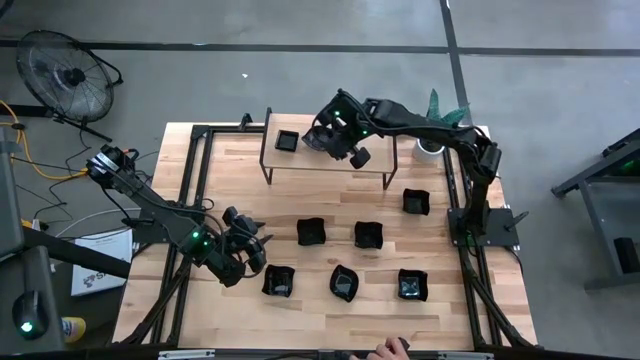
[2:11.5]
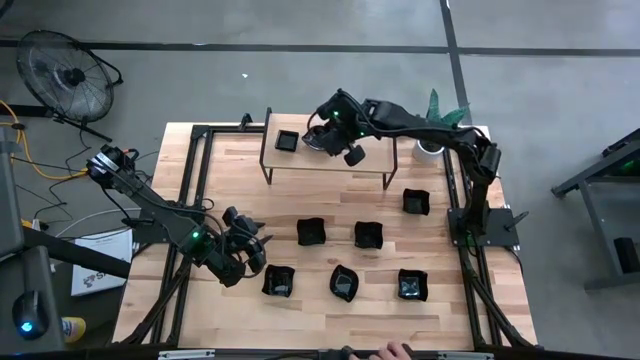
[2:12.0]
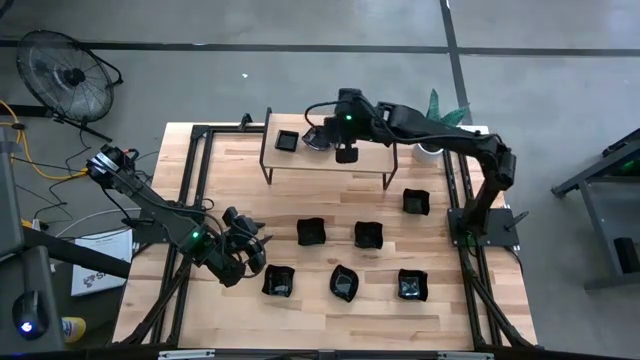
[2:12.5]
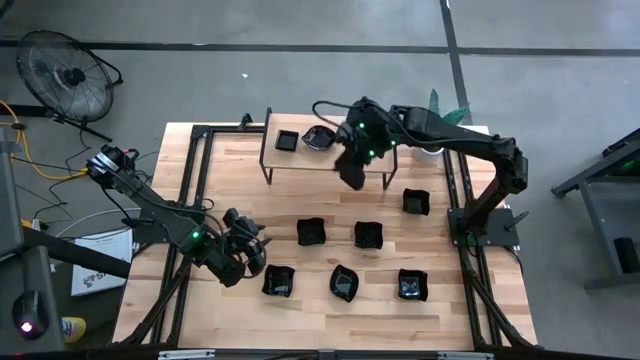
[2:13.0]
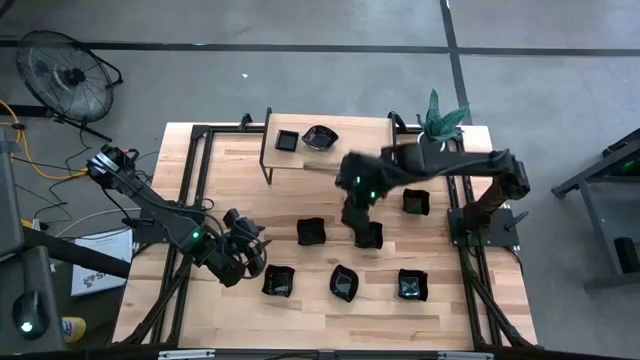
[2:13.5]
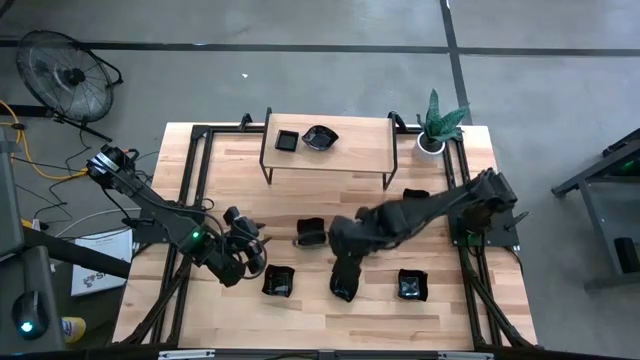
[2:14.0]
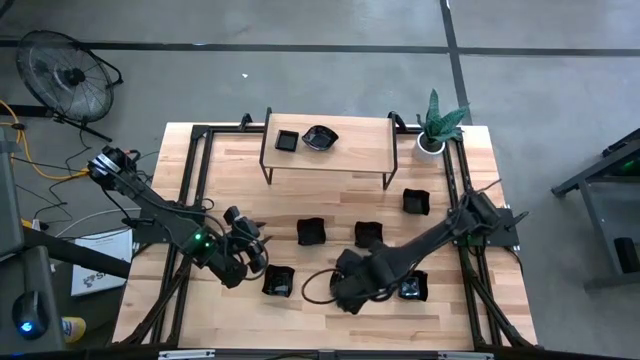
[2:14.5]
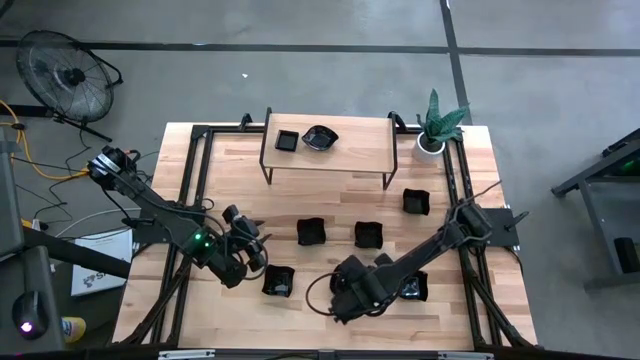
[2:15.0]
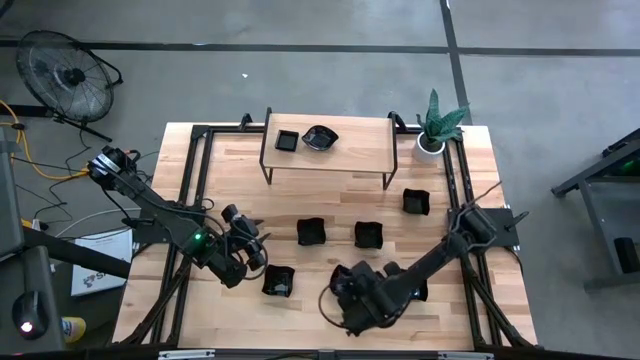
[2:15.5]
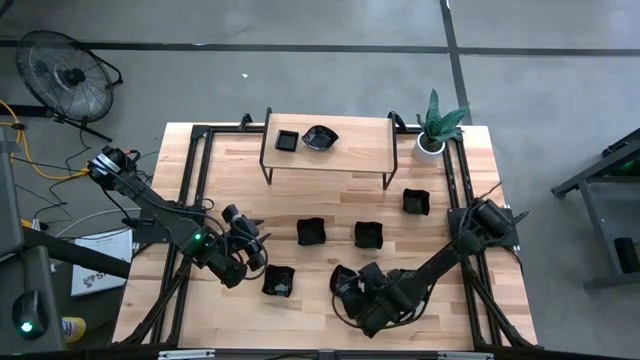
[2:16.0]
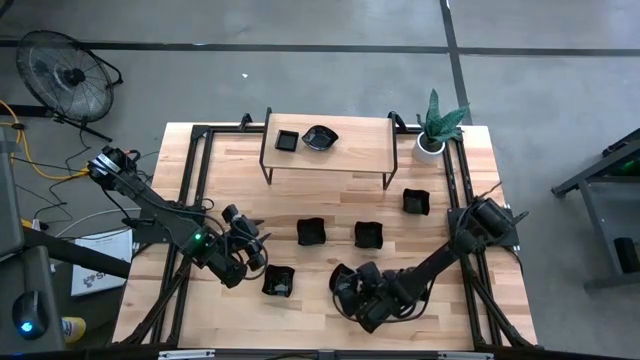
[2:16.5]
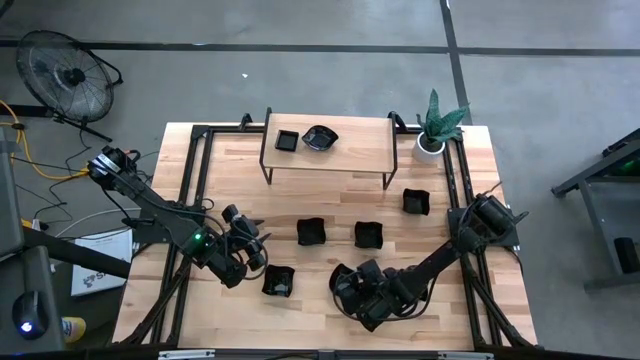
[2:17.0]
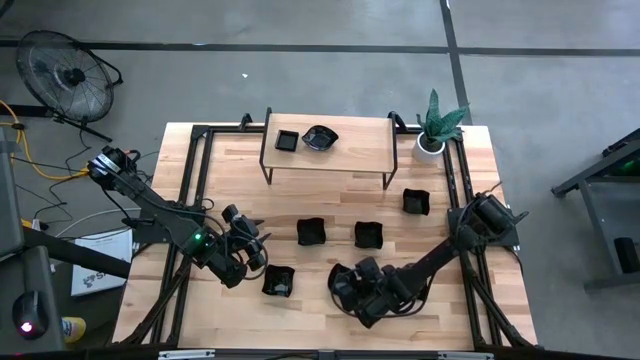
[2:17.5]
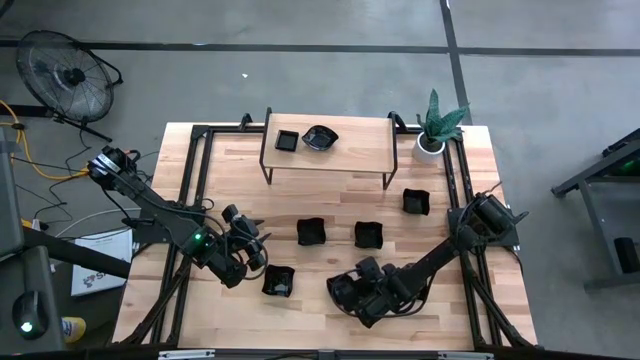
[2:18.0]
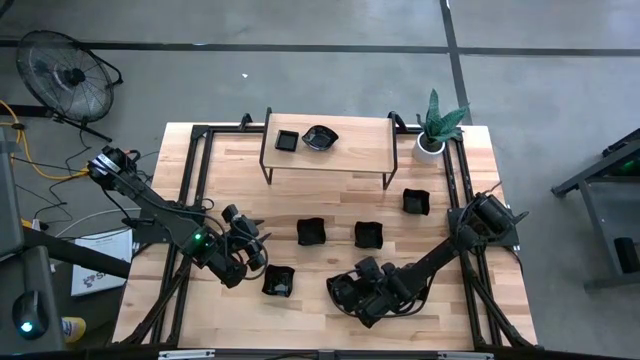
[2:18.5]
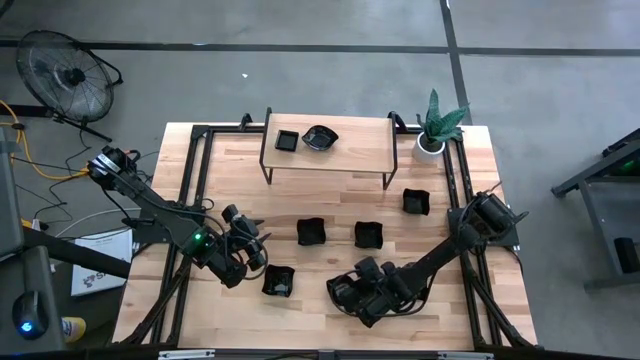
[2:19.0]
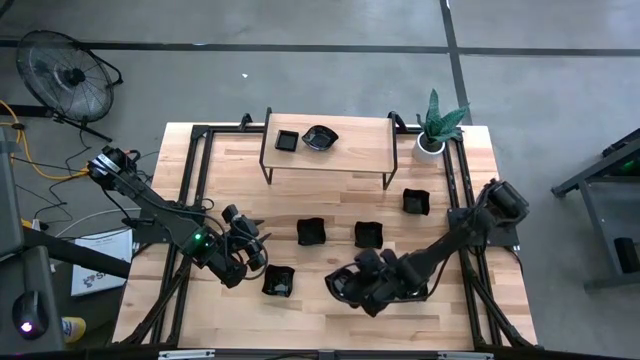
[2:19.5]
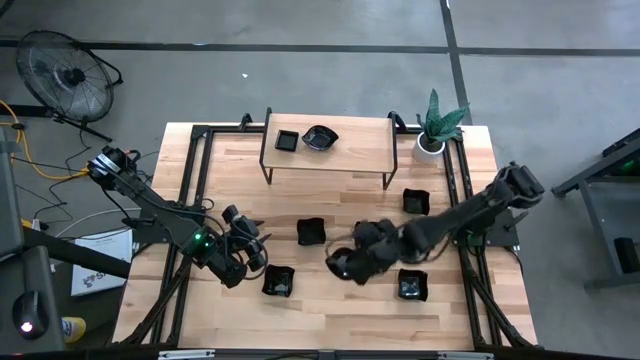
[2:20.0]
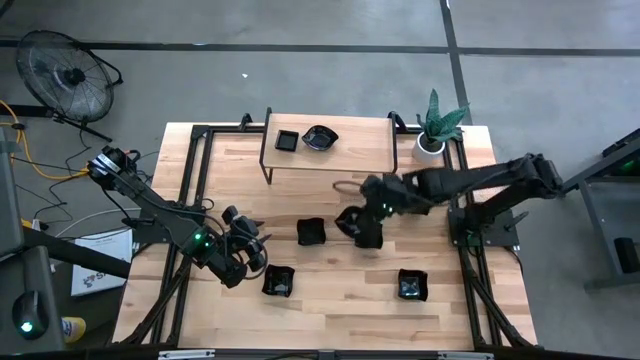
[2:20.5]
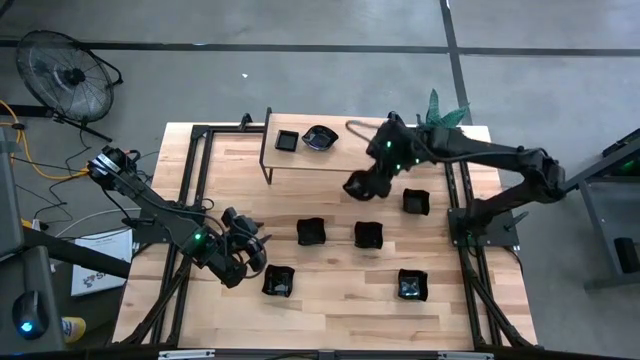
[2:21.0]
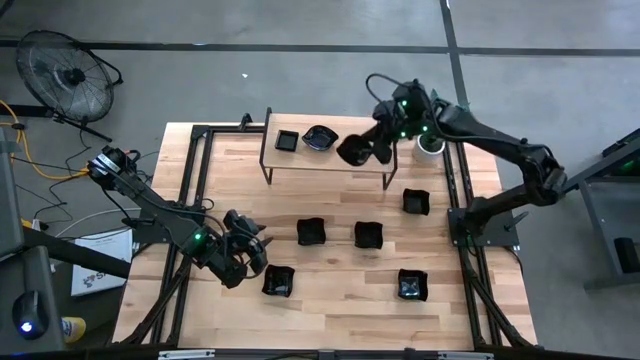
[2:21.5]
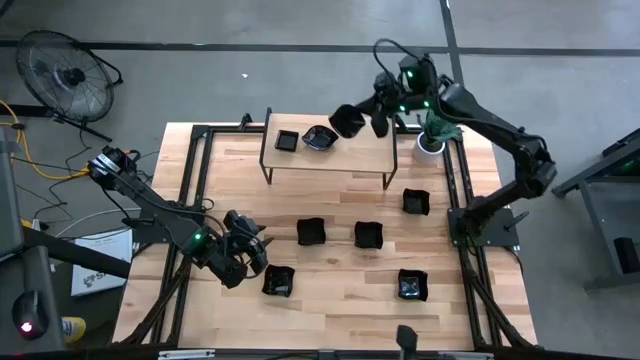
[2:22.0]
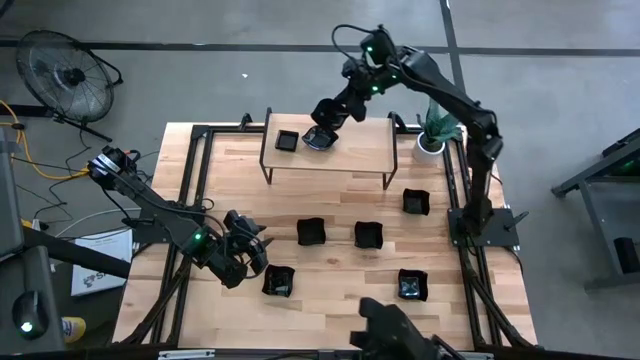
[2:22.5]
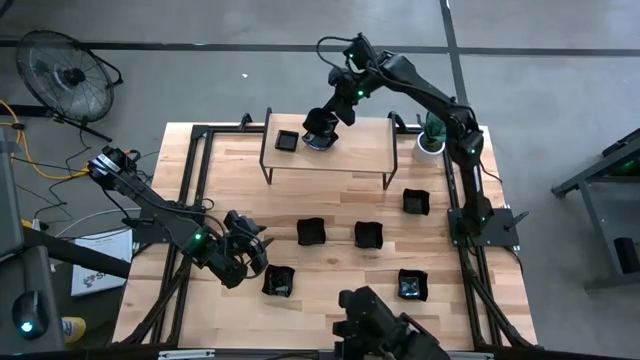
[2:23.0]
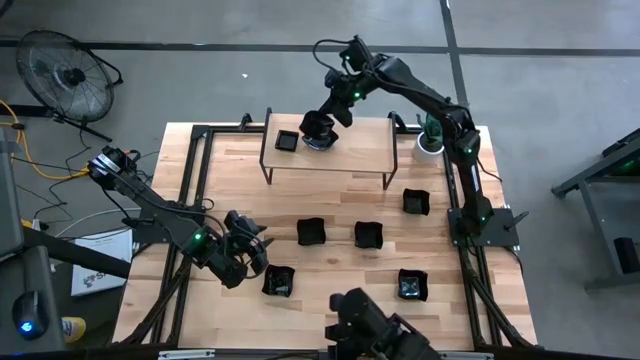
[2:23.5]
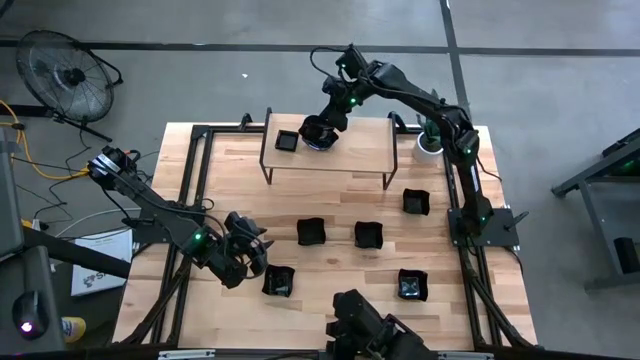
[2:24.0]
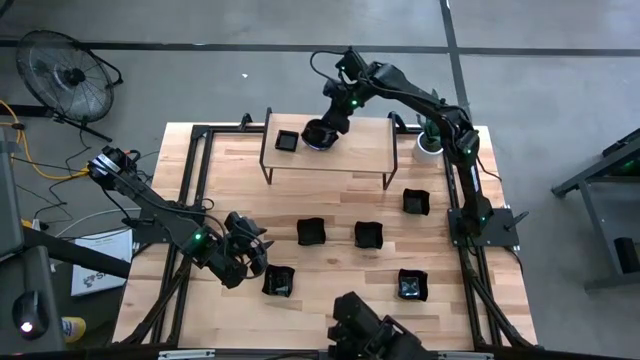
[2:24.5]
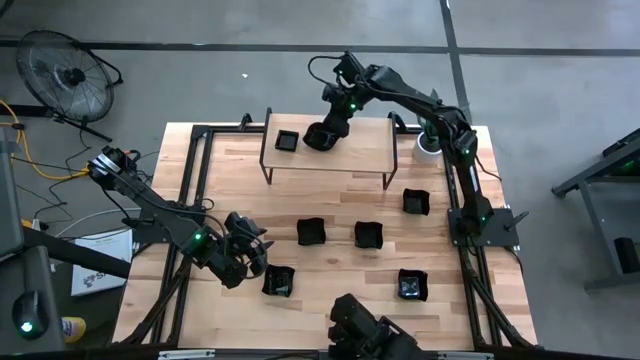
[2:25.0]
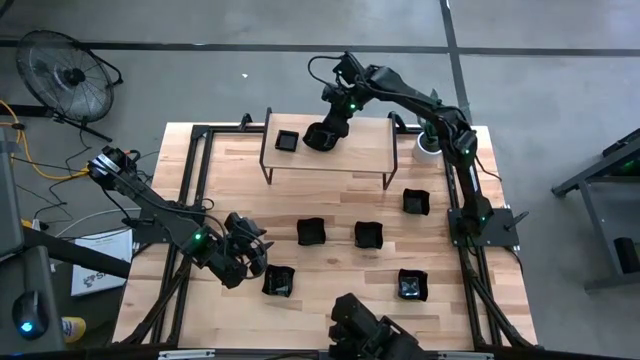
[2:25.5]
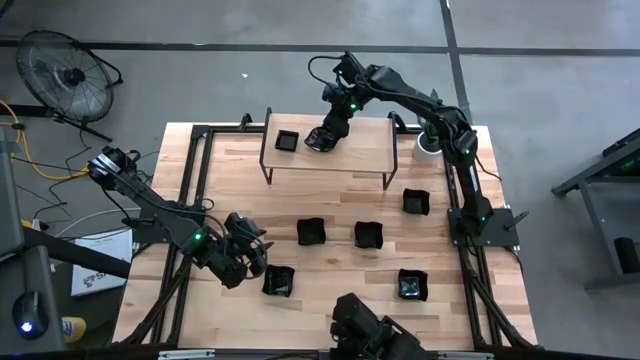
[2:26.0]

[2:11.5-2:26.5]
Task: Pick & Place Mini shaped plates
Stack the black leaf-shaped plate on top of the stacked black leaf-shaped plates on the shelf

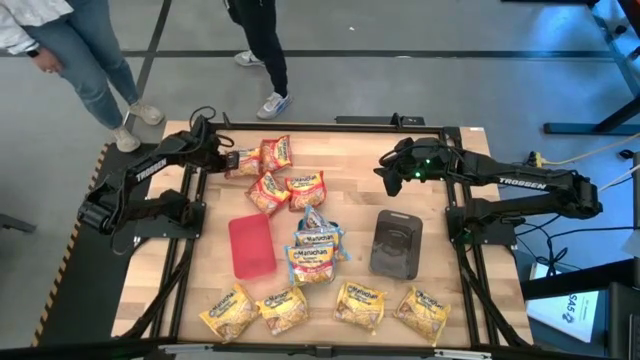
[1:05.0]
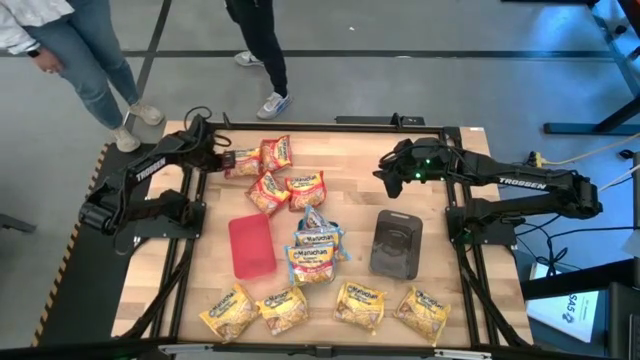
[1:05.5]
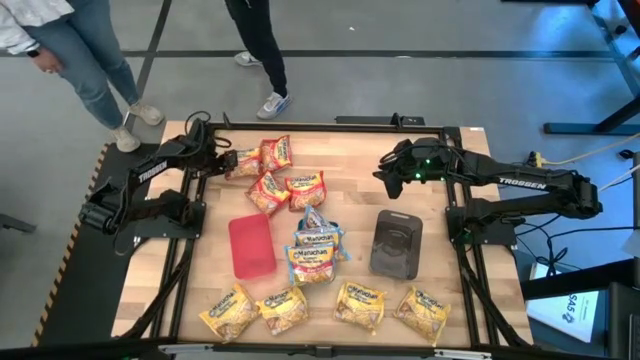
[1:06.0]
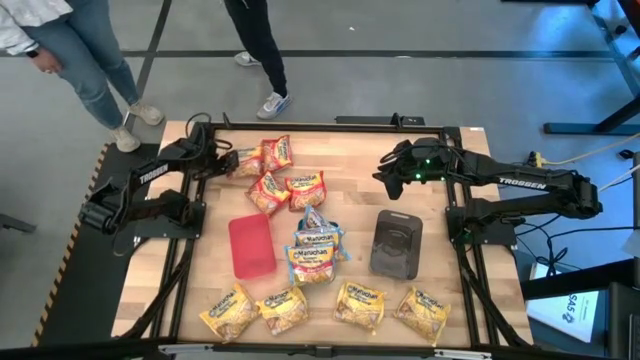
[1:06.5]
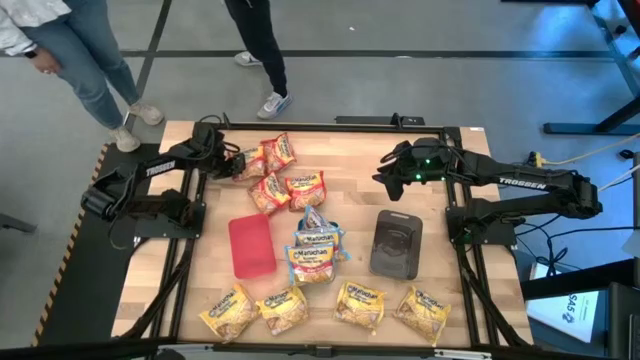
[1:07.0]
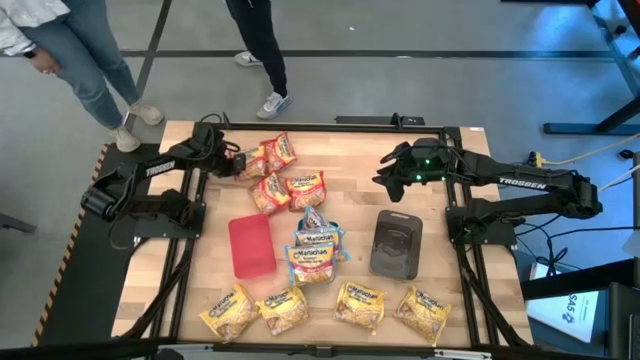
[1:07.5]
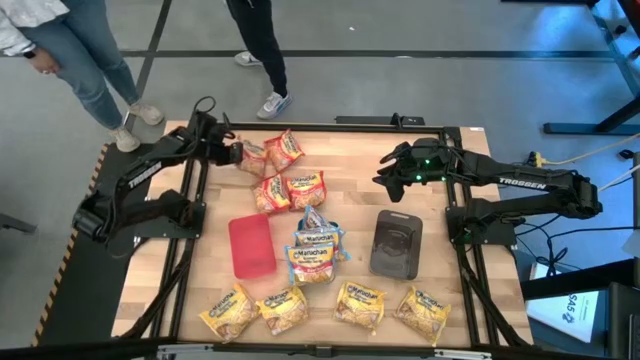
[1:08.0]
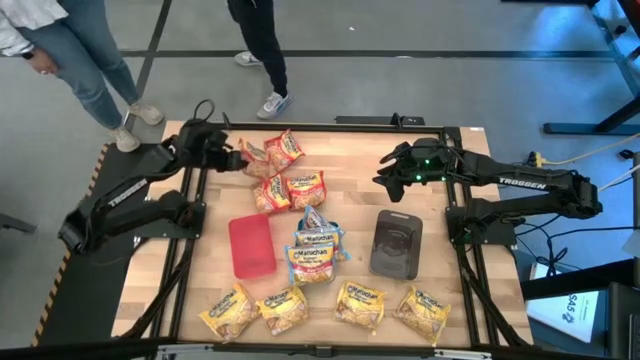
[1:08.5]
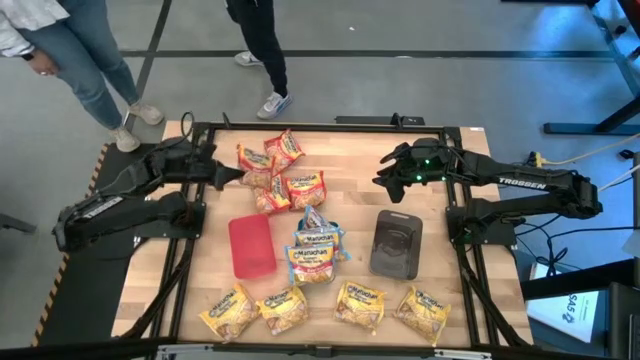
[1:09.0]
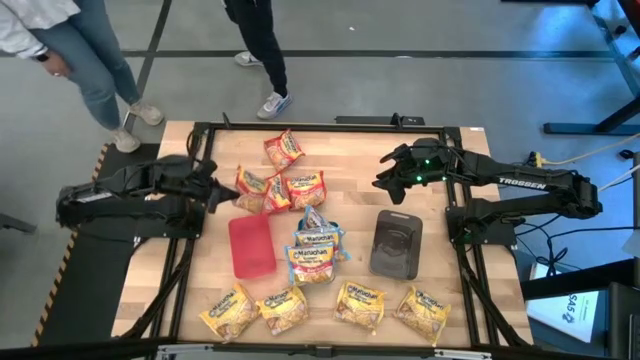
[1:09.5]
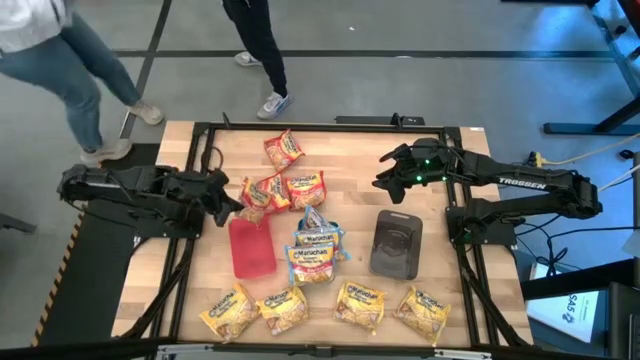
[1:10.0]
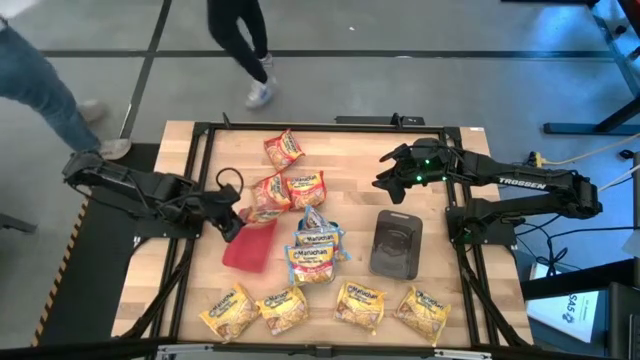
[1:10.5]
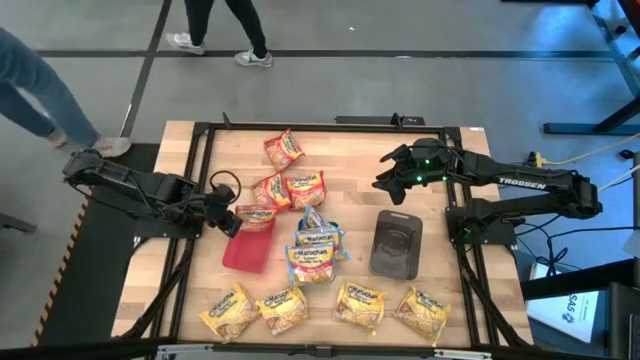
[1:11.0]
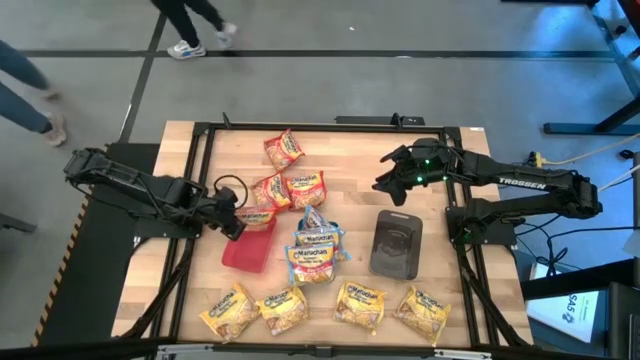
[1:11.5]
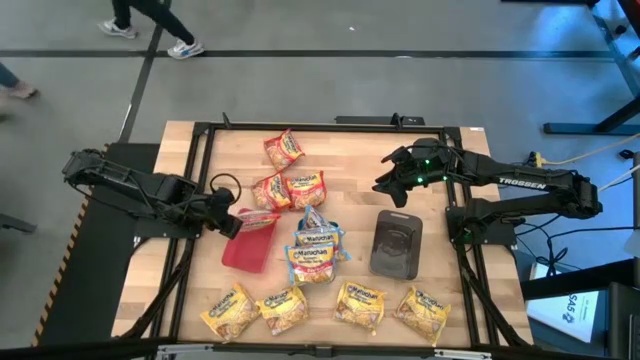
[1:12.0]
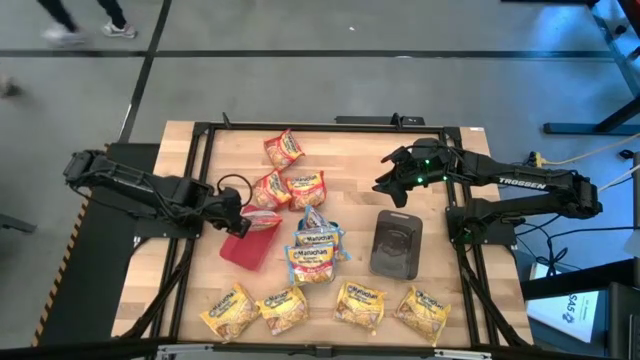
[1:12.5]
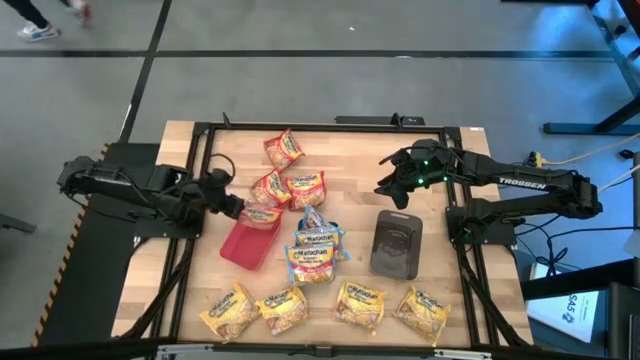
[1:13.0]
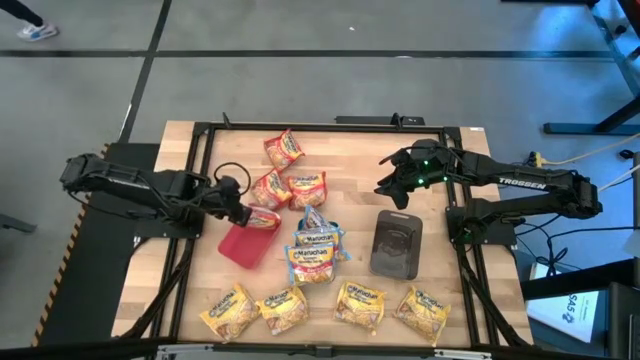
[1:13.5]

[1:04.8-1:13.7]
Task: Sort Maruchan noodles
Put the red noodle pack into the red bin
